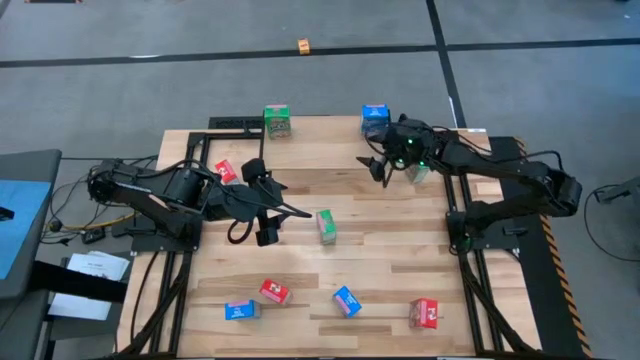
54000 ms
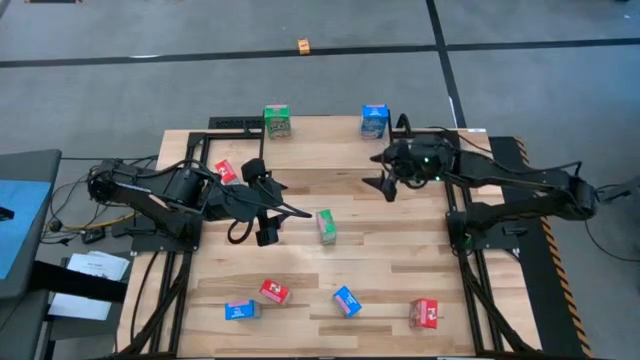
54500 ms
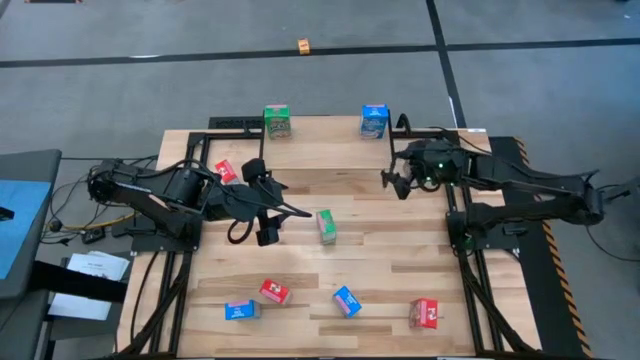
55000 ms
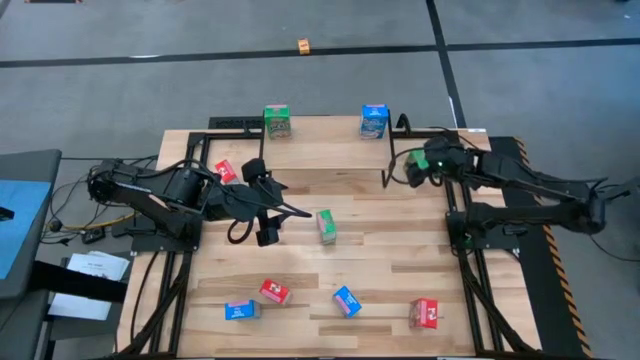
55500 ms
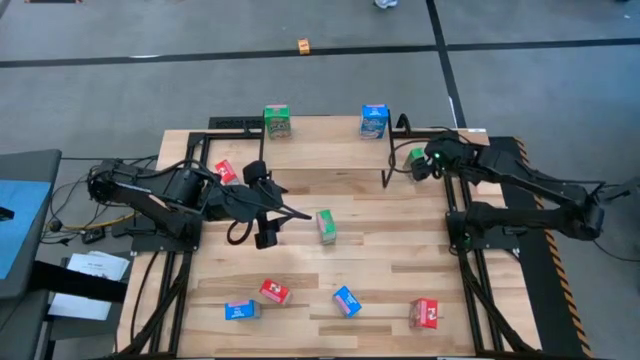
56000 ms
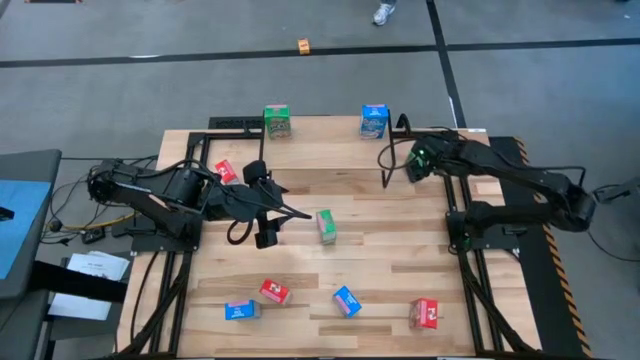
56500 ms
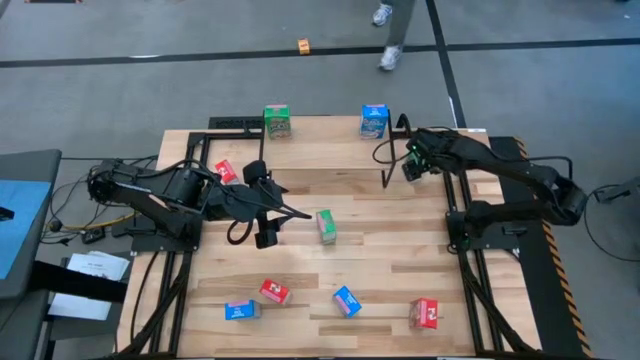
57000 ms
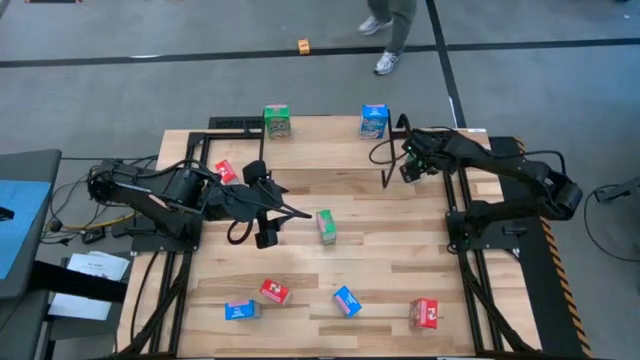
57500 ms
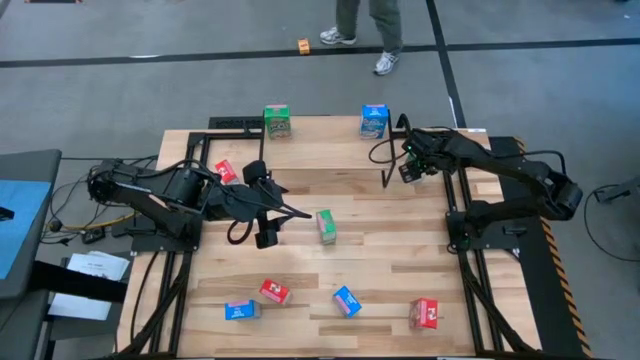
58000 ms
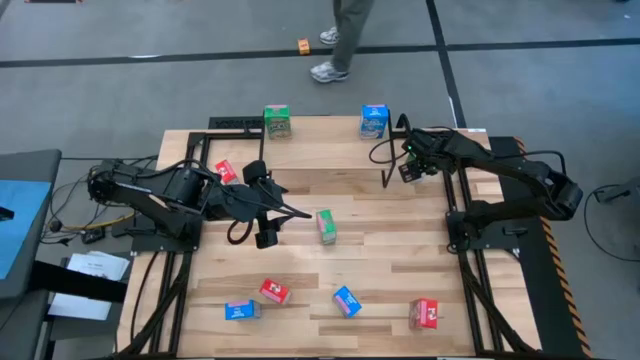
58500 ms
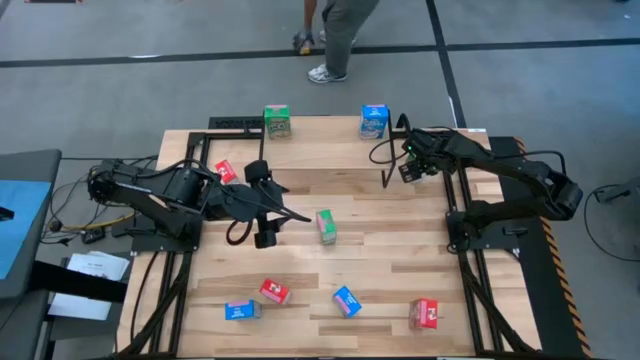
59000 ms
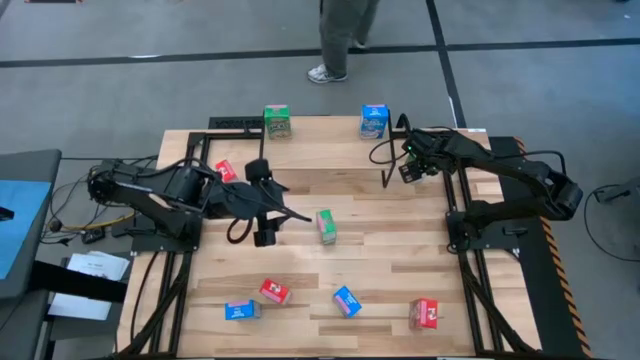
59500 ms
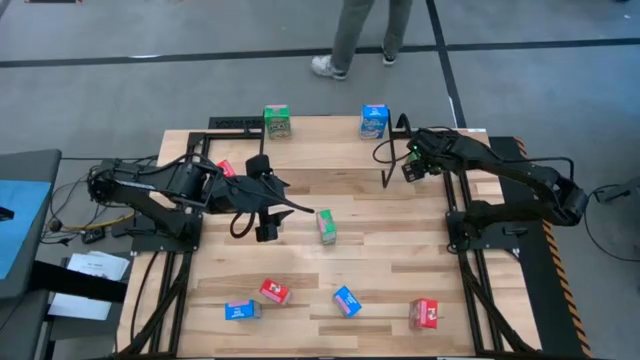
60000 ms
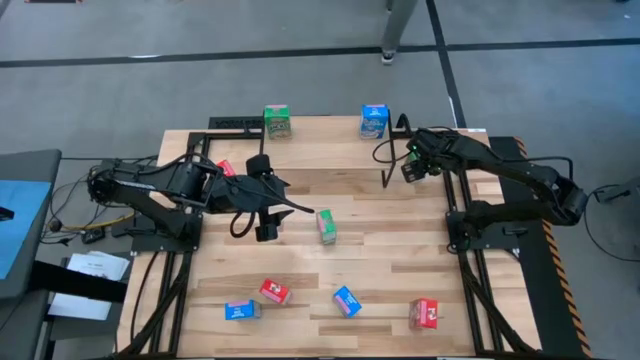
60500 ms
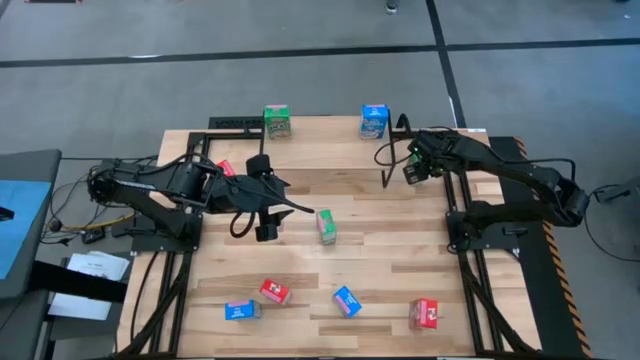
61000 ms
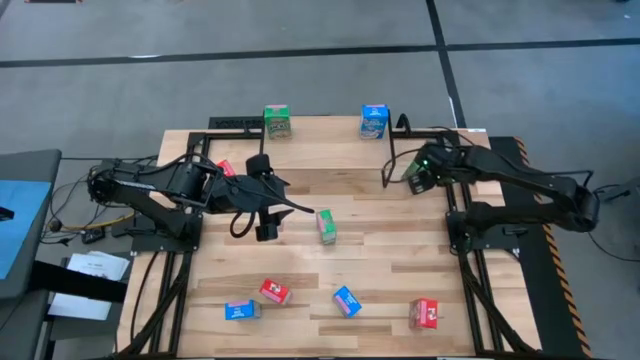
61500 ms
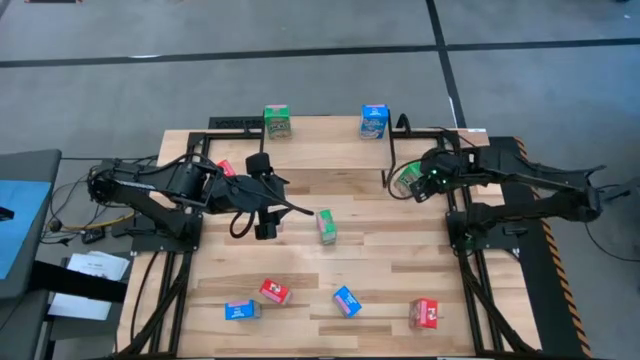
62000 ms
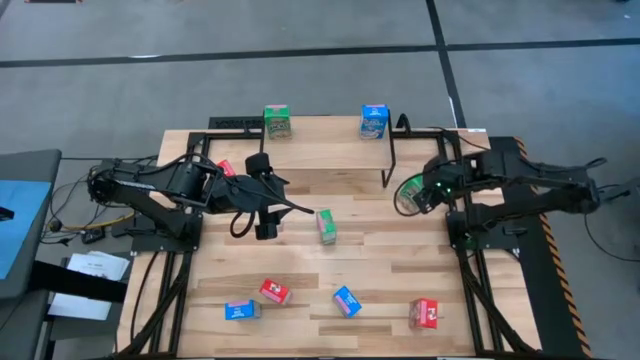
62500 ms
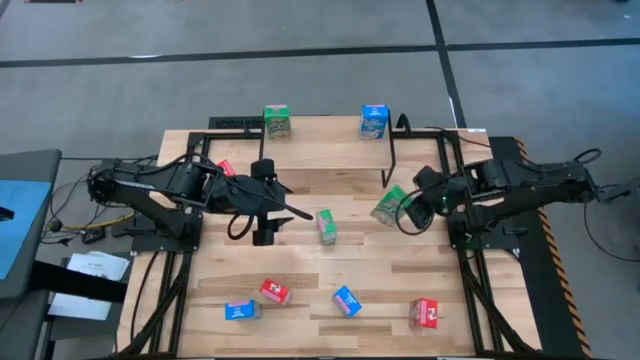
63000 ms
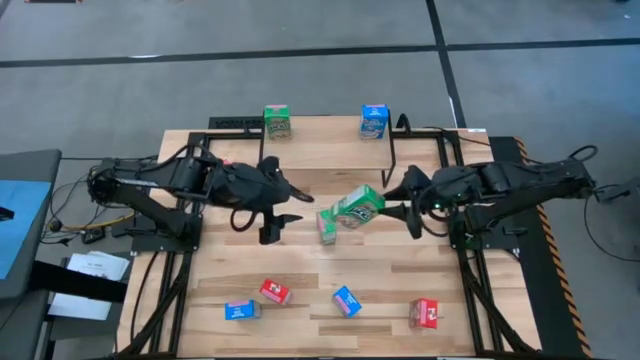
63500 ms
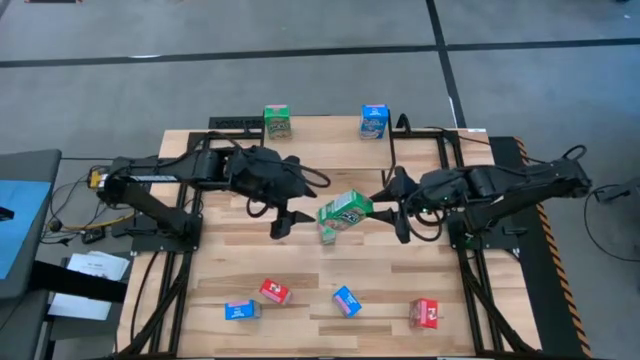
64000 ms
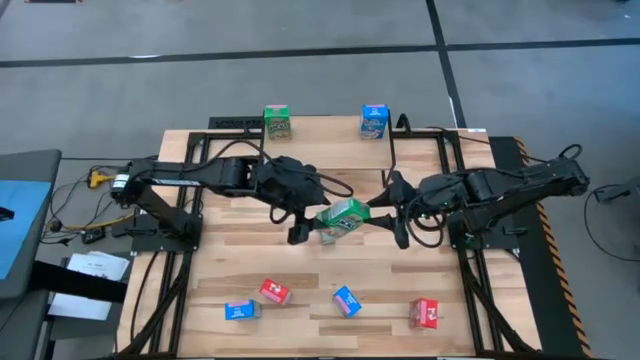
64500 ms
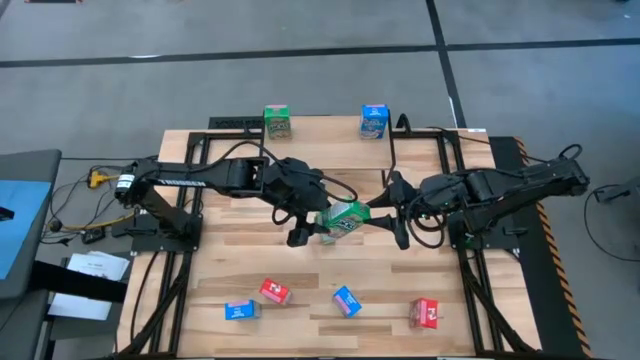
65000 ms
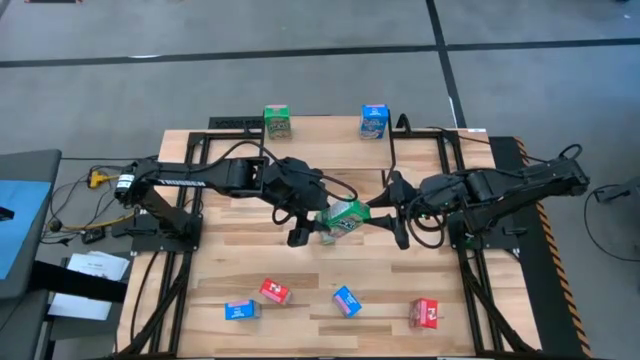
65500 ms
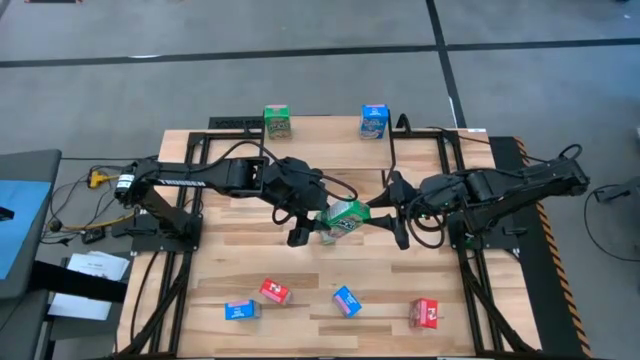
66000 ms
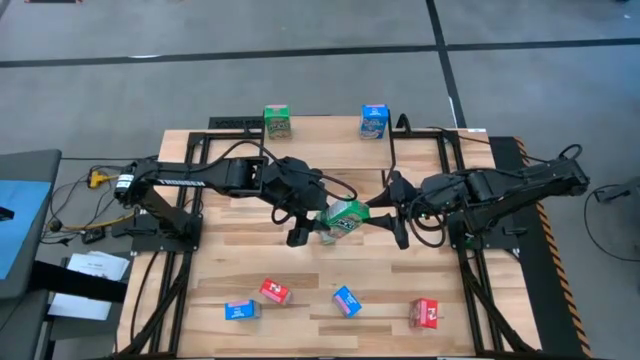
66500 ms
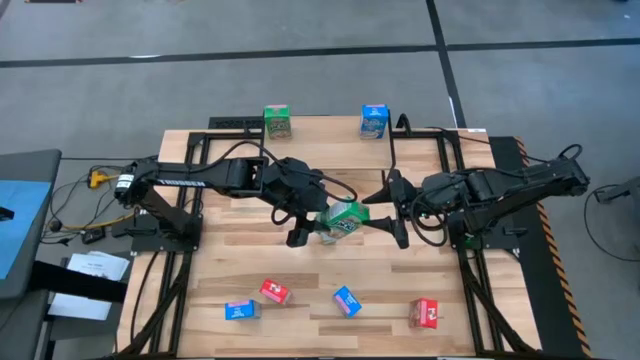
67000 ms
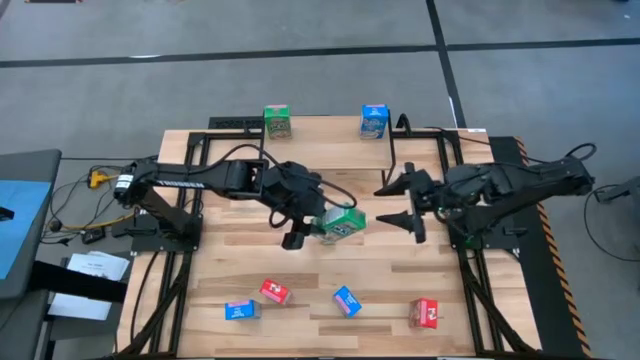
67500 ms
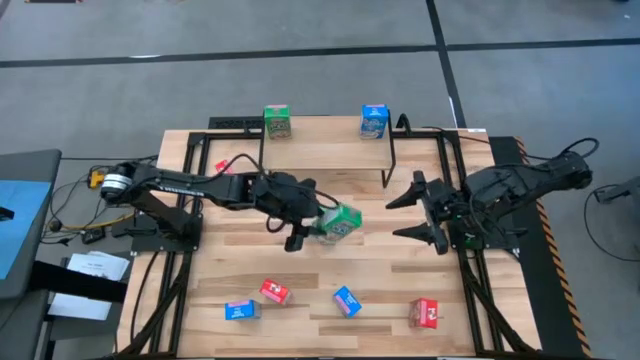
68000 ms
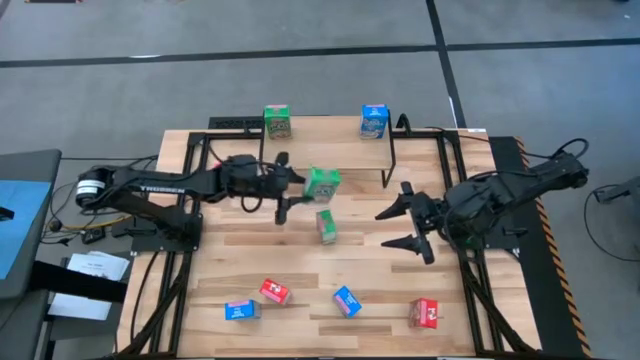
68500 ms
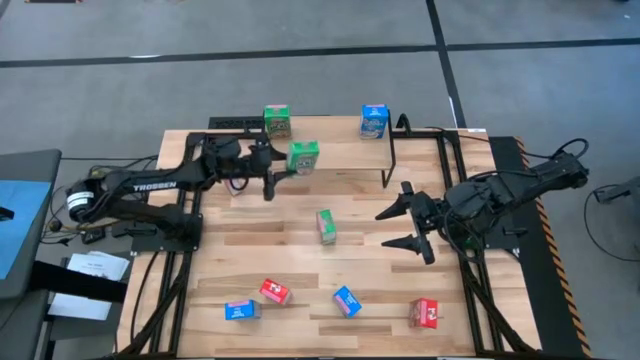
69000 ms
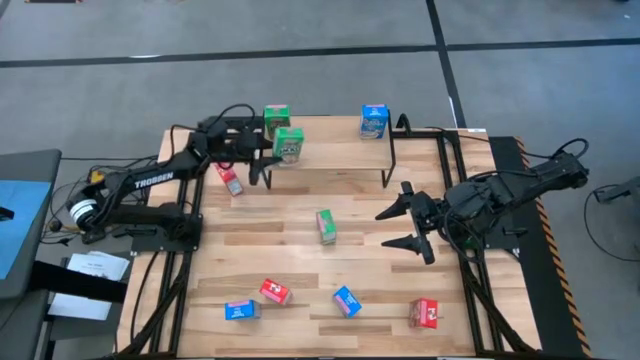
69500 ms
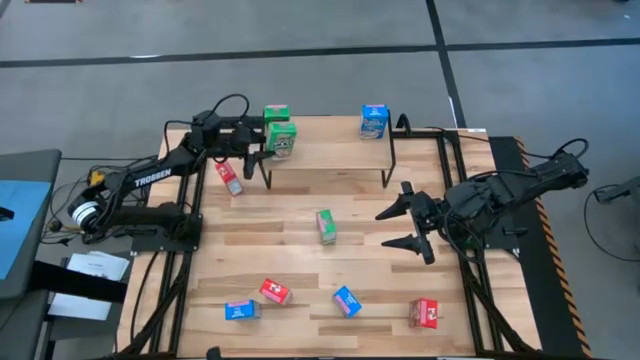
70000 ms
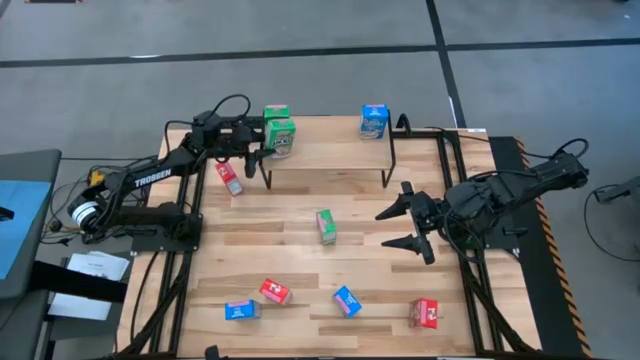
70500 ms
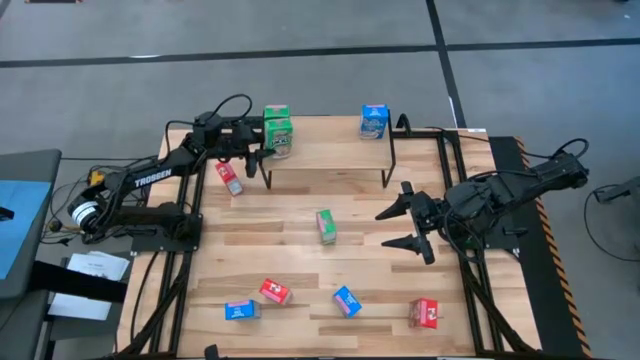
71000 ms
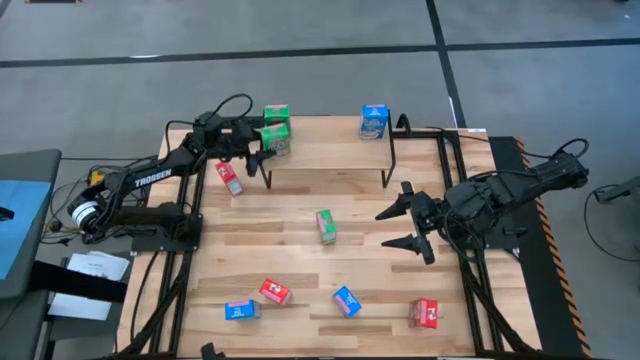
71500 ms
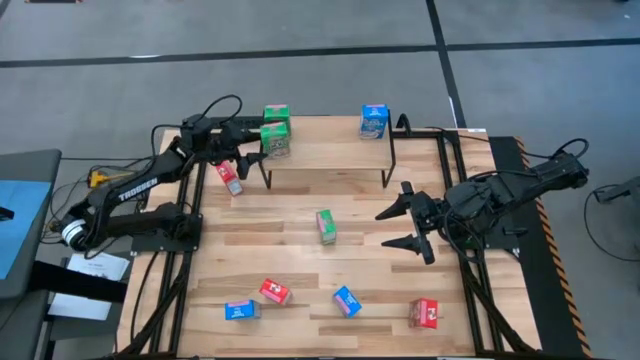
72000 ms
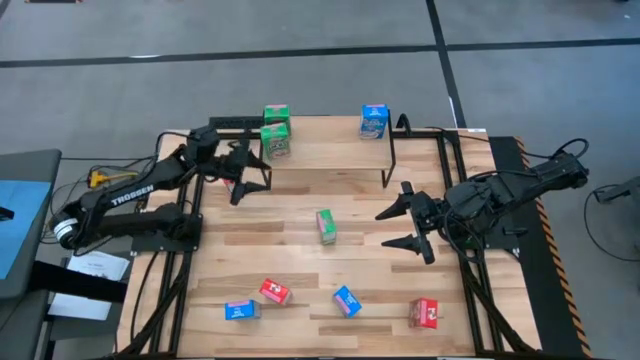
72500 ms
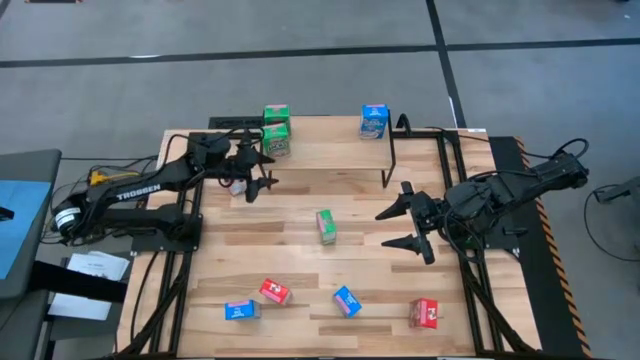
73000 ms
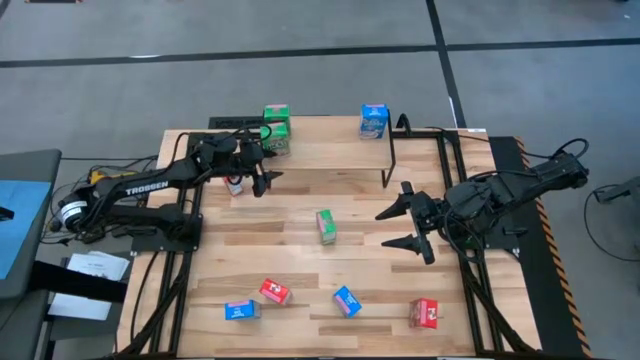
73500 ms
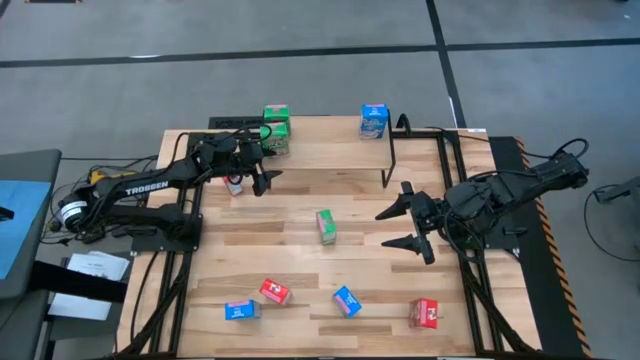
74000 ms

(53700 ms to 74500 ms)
Task: Stack cereal on shelf
Put the top green cereal box on the shelf aligned with the other green cereal box

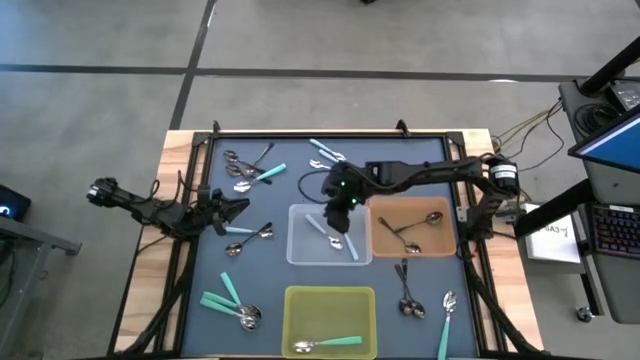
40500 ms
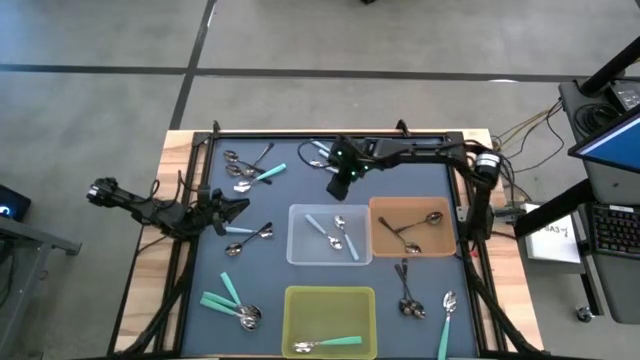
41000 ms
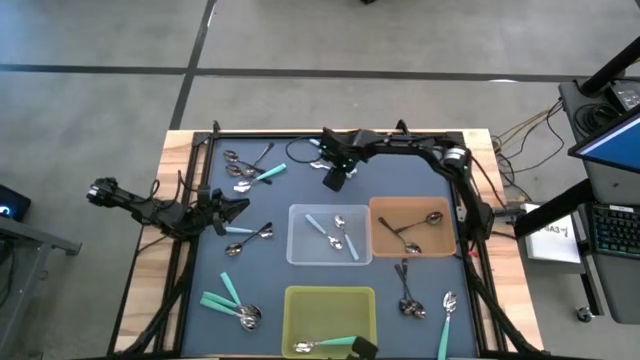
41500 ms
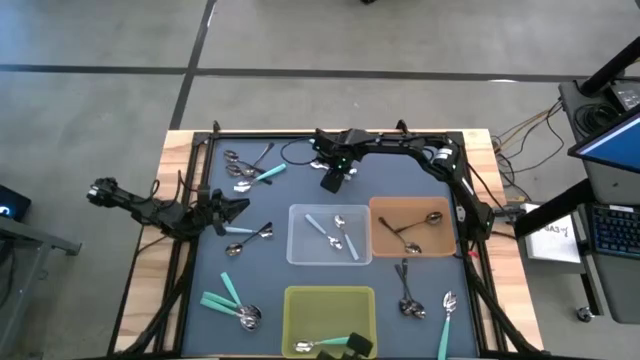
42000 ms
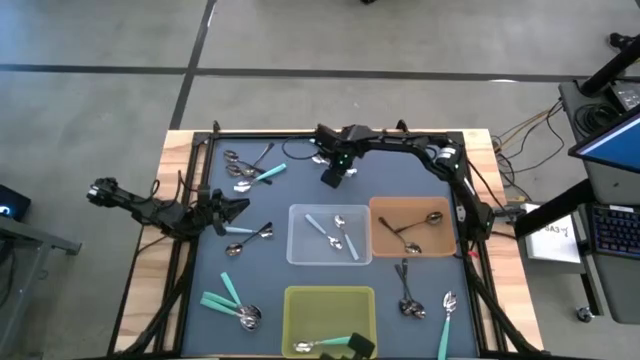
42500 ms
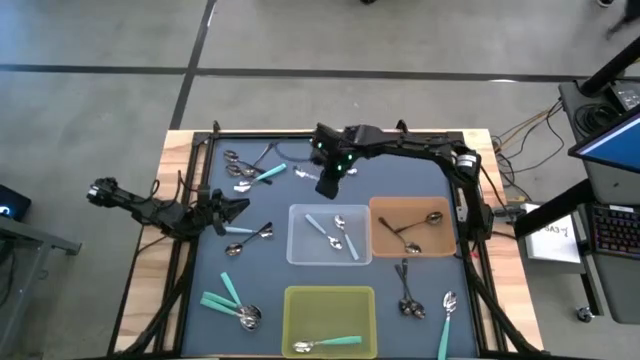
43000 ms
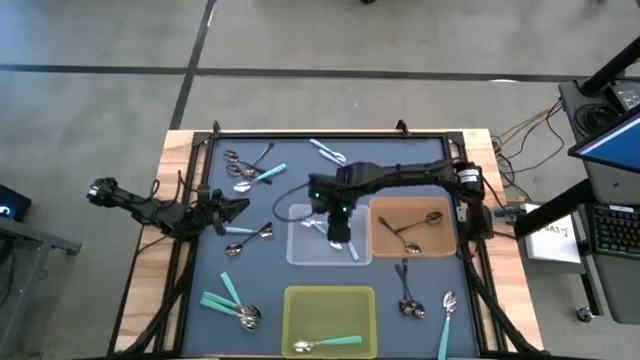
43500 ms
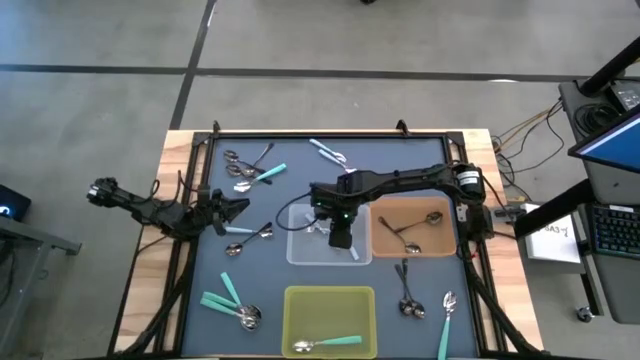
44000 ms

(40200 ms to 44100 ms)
Task: Sort silverware by color (type)
Put the light blue spoon into the transparent bin
